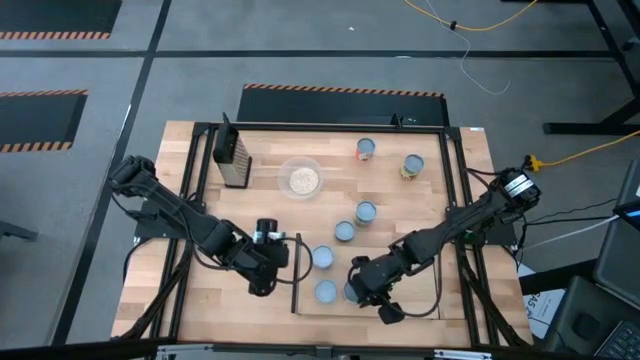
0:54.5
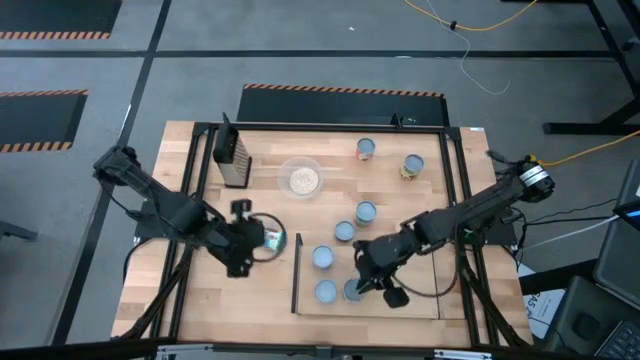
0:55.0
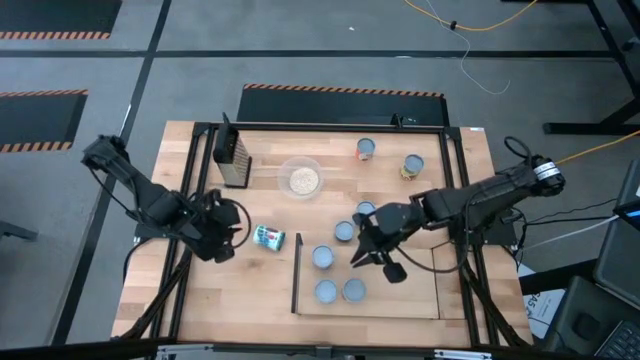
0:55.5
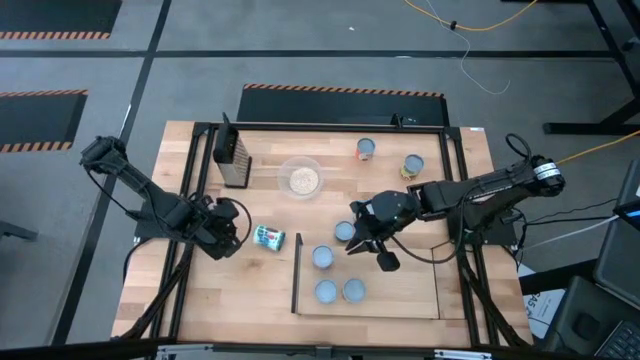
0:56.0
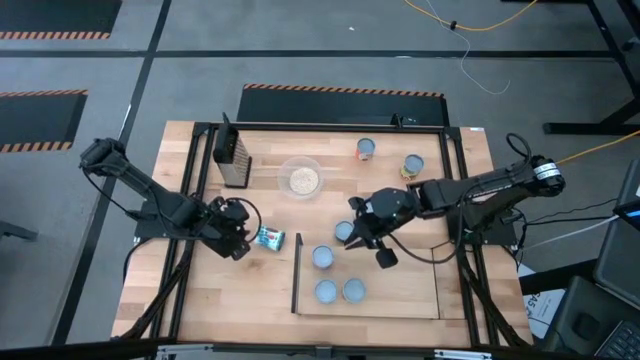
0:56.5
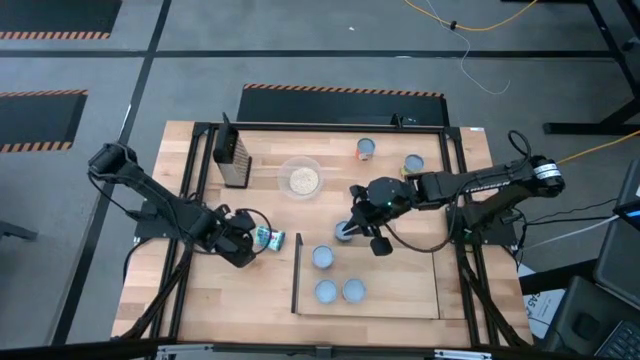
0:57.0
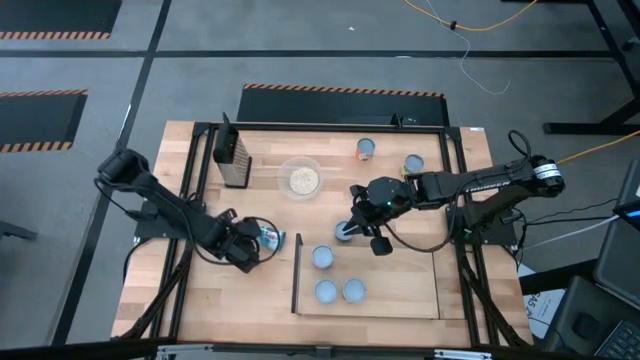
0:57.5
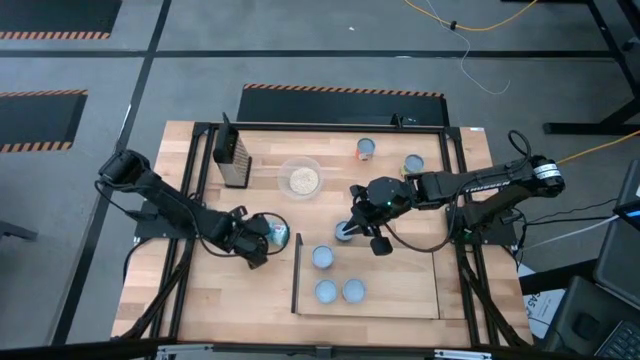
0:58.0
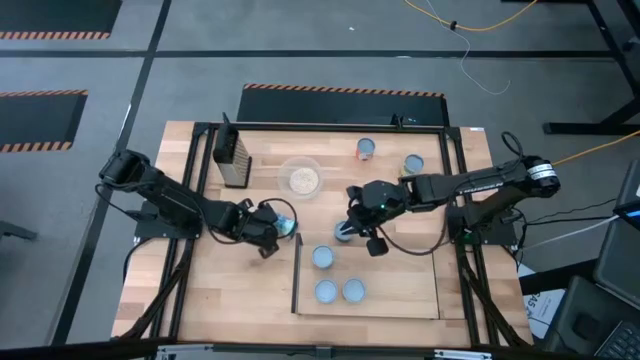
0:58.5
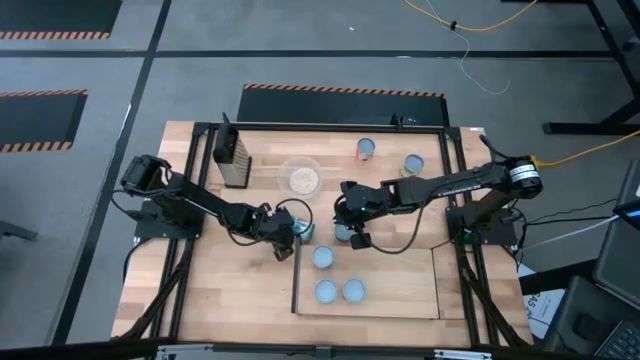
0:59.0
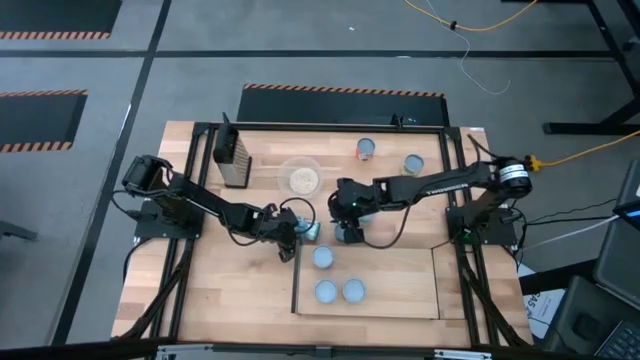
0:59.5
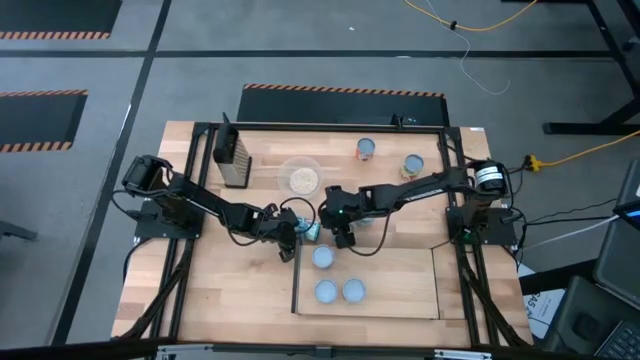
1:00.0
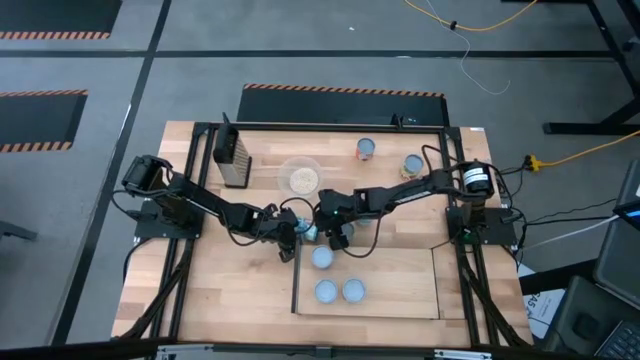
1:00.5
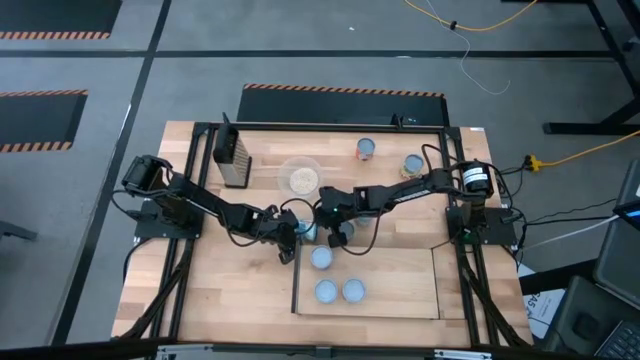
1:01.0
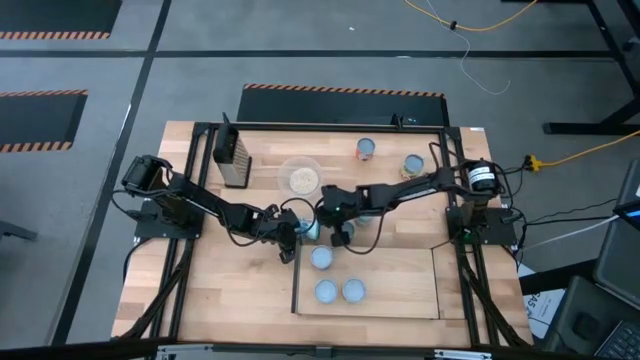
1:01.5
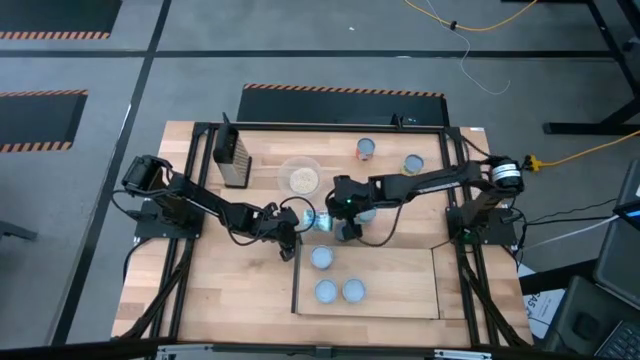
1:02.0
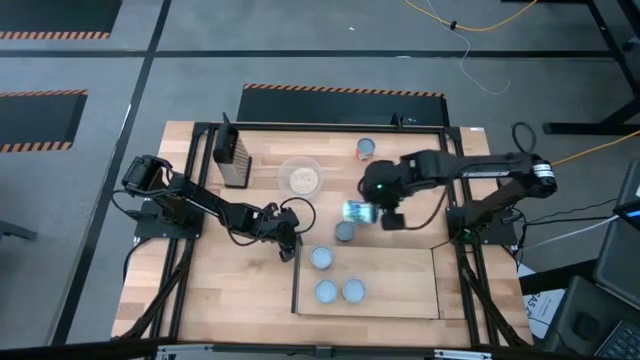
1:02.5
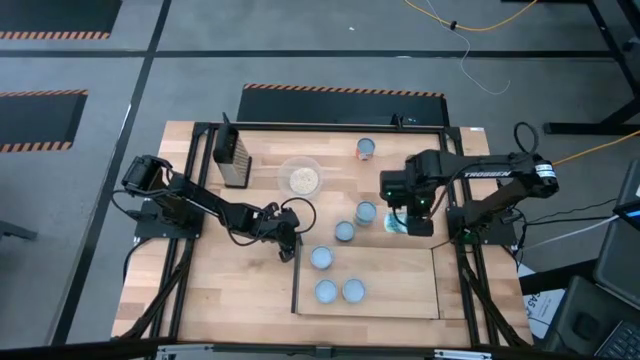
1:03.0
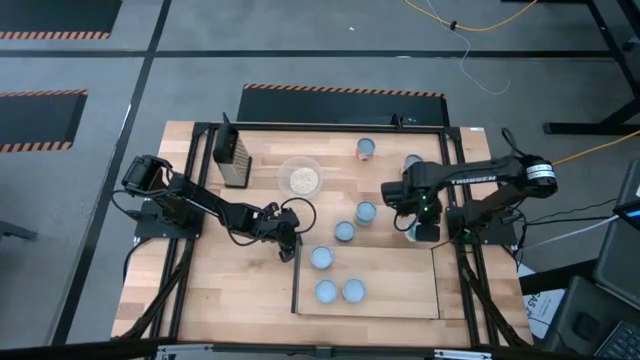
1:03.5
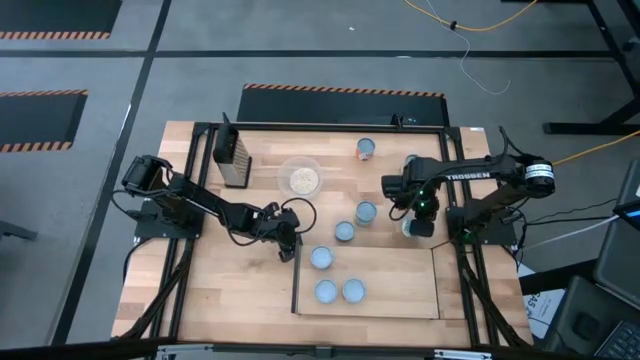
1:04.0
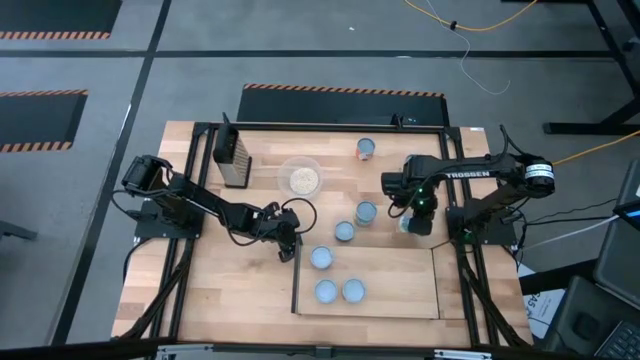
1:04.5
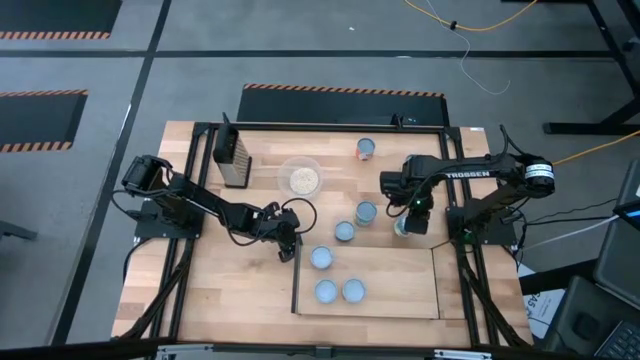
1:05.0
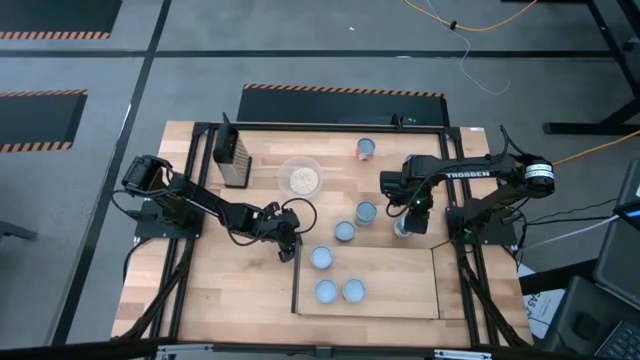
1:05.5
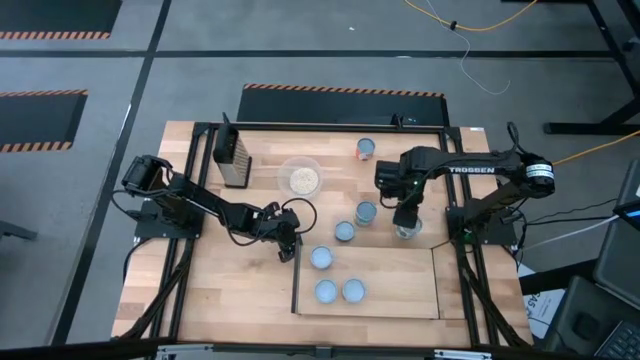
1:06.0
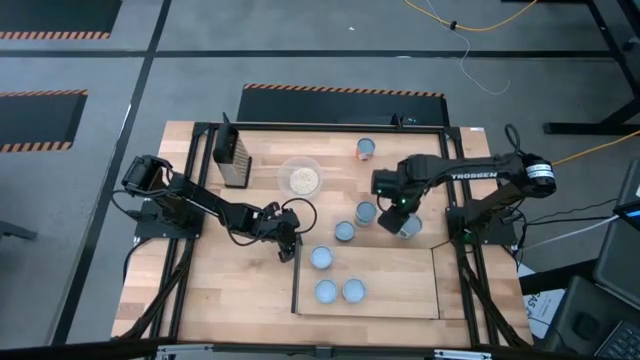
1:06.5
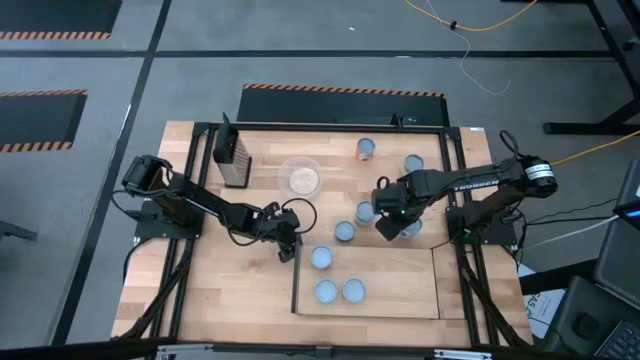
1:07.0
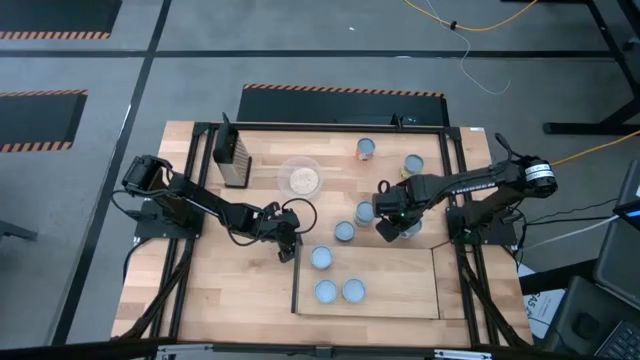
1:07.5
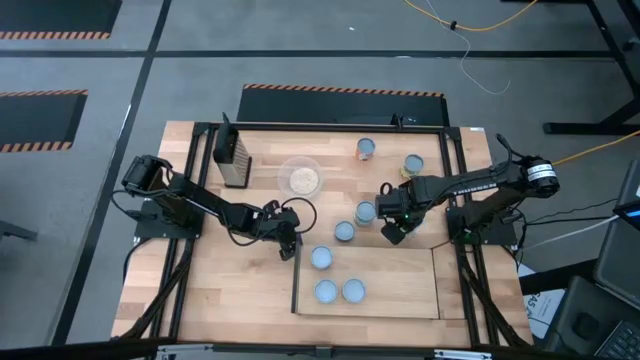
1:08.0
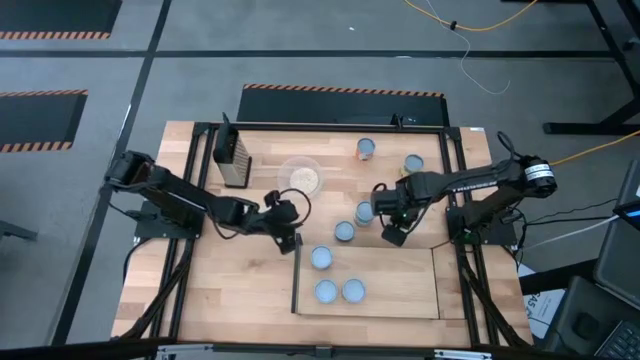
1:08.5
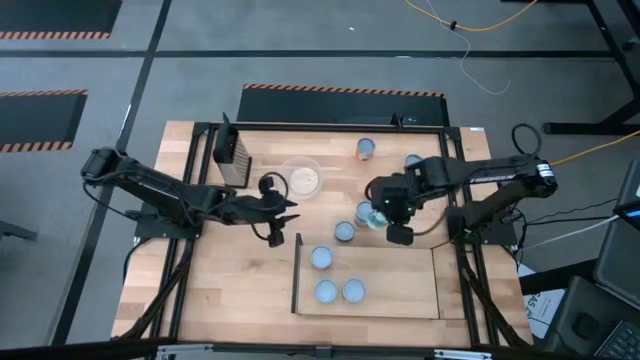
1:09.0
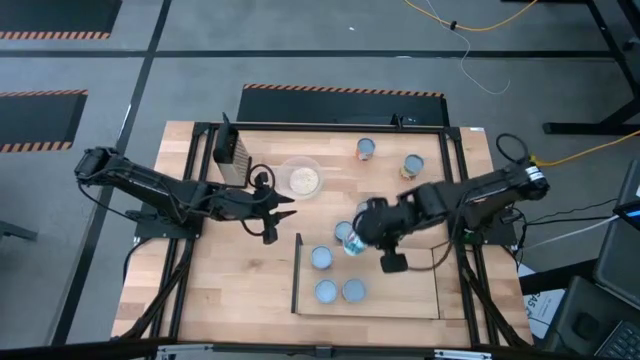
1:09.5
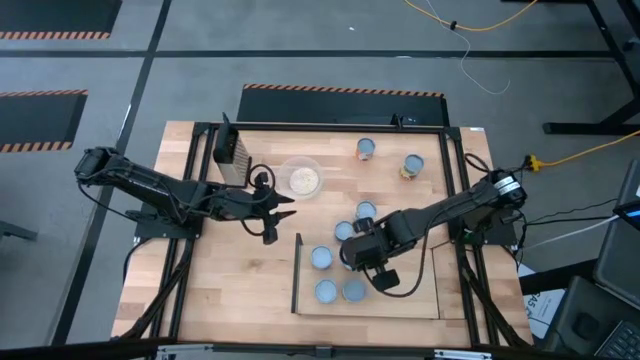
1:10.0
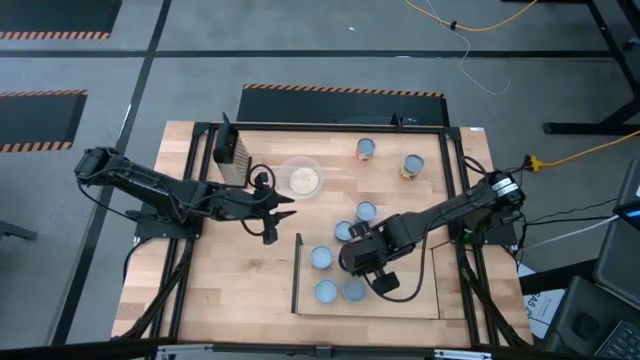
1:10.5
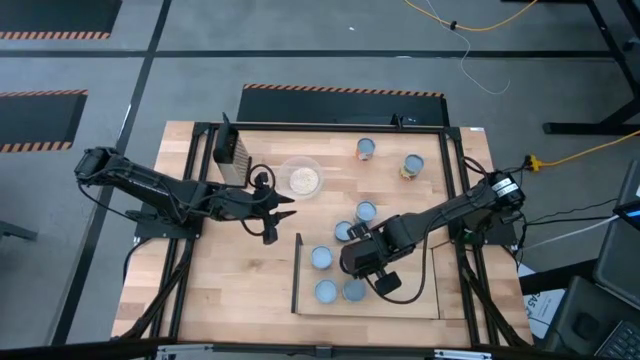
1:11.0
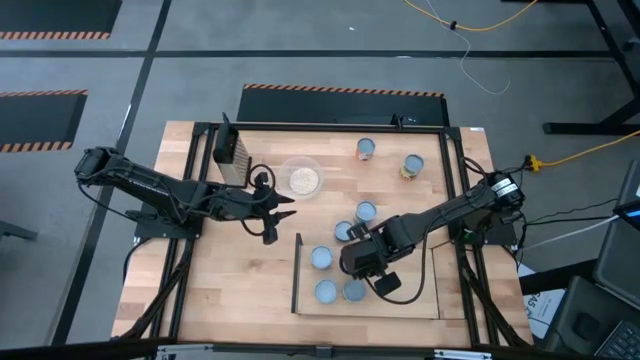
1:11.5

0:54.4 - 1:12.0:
Task: Pick and place cans onto a shelf
Put the canned mixed vegetables on the shelf

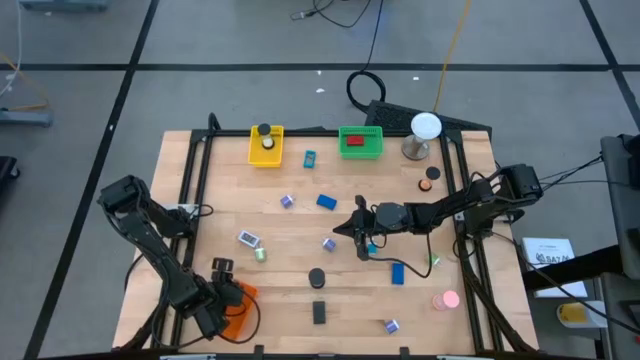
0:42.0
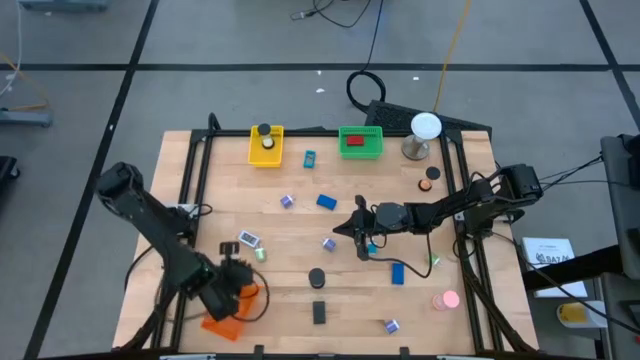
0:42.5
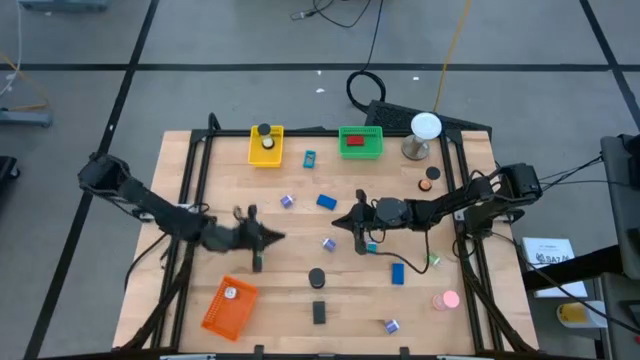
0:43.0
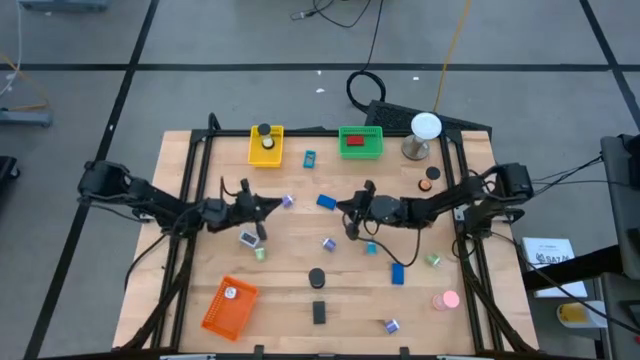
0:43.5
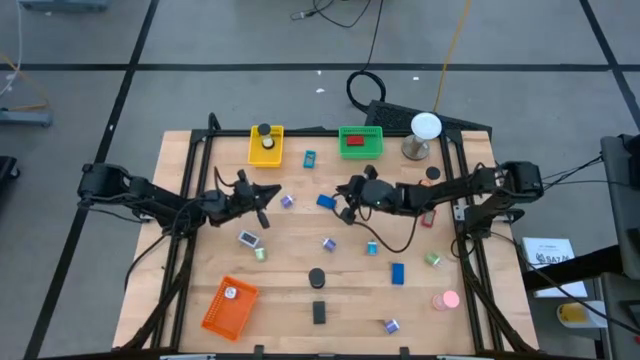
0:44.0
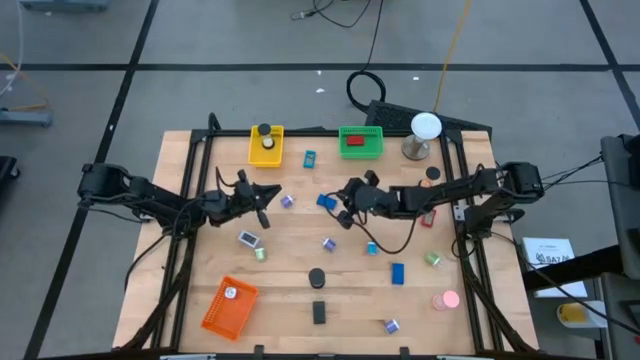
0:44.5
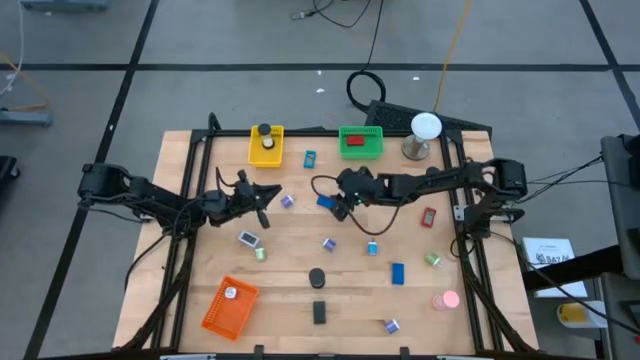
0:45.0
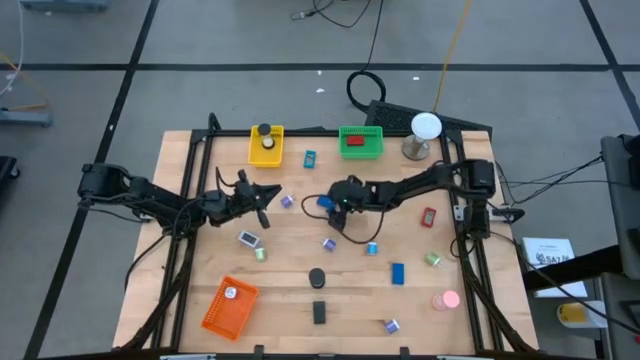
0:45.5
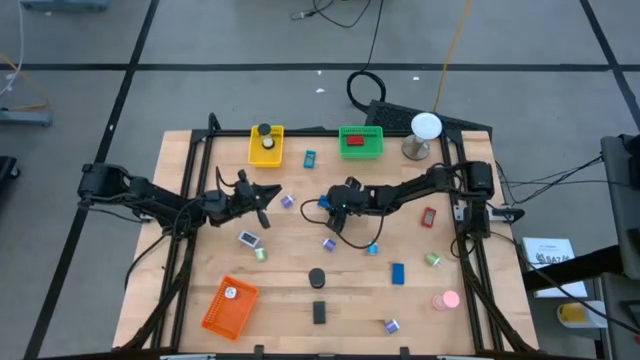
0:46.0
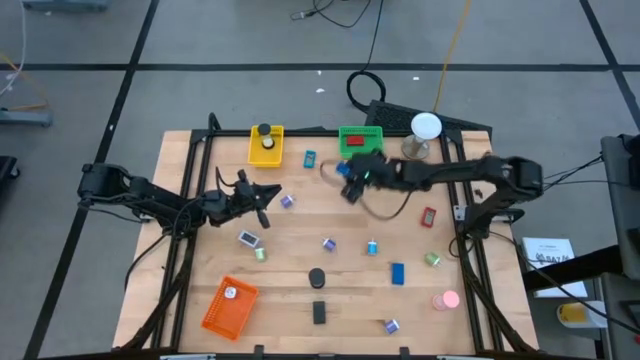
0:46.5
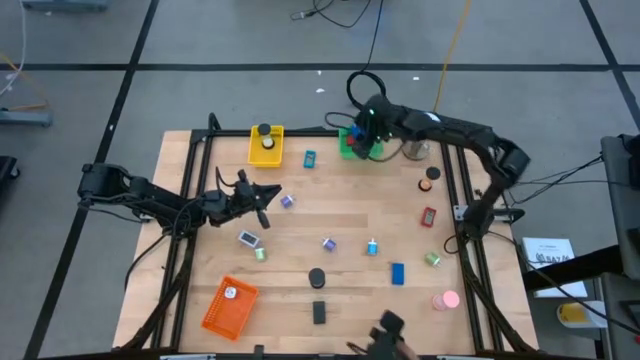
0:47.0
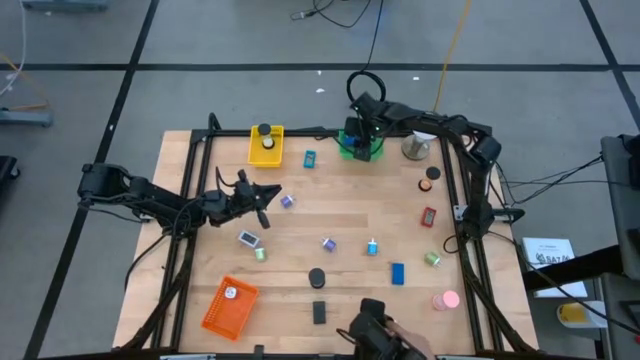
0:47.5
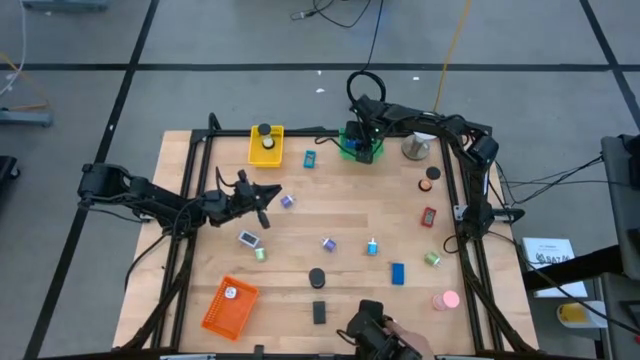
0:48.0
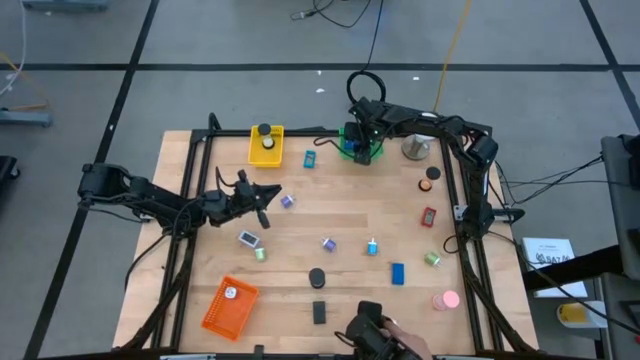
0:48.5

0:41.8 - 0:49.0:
Task: Pick & Place Office items
Put the top blue digital clock into the green bin
